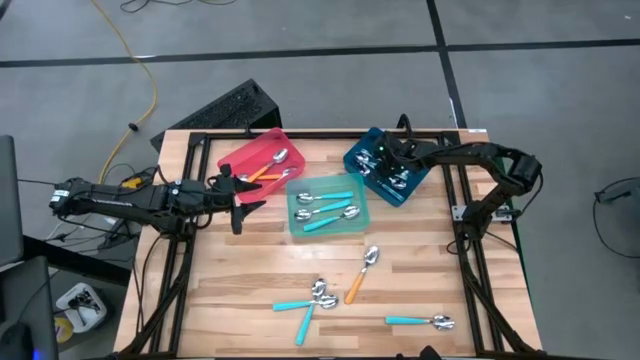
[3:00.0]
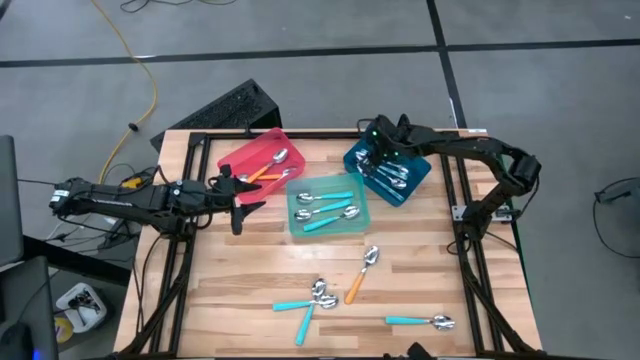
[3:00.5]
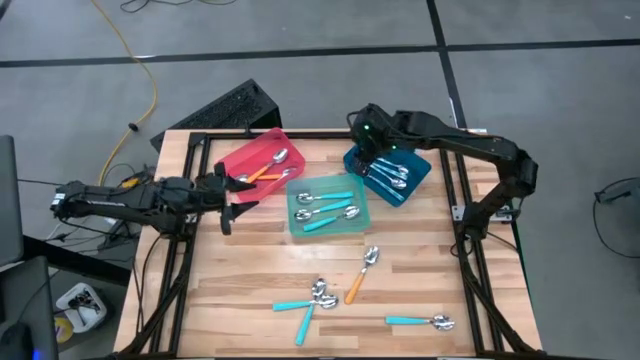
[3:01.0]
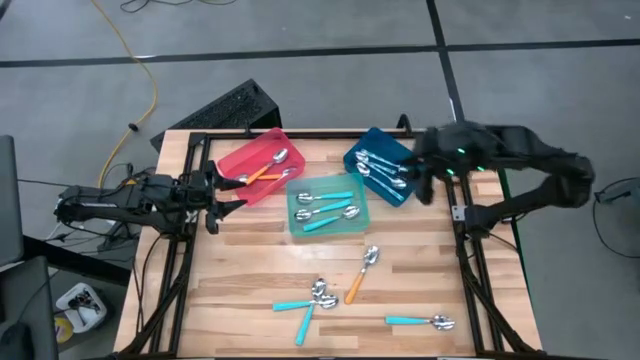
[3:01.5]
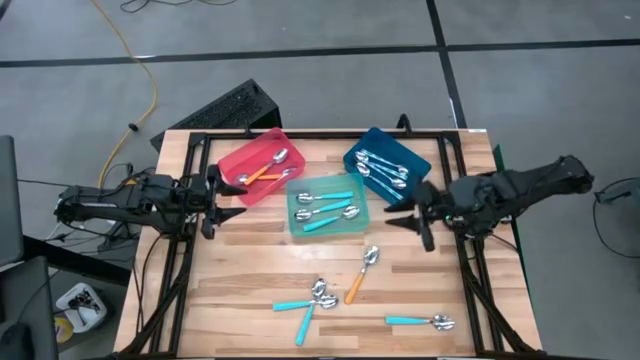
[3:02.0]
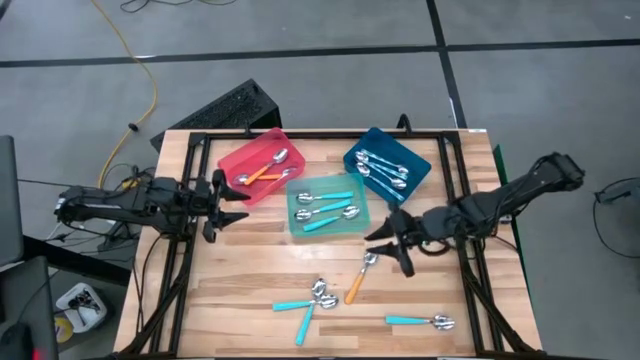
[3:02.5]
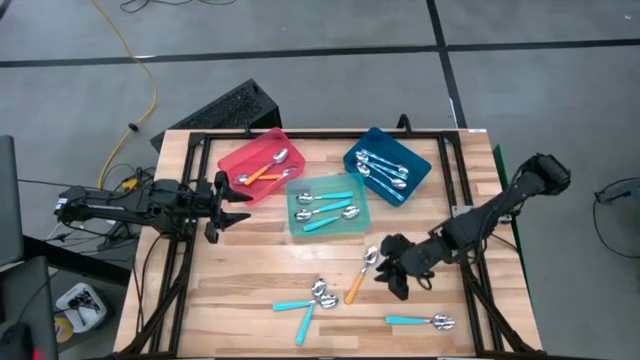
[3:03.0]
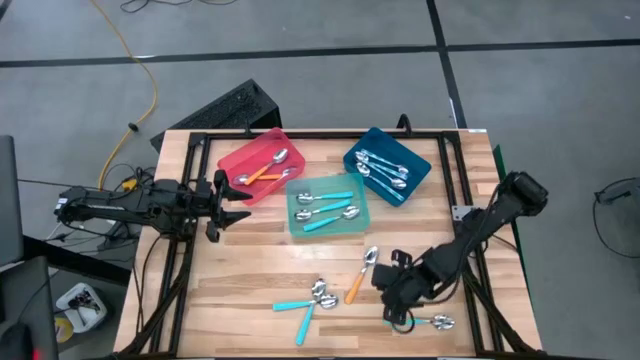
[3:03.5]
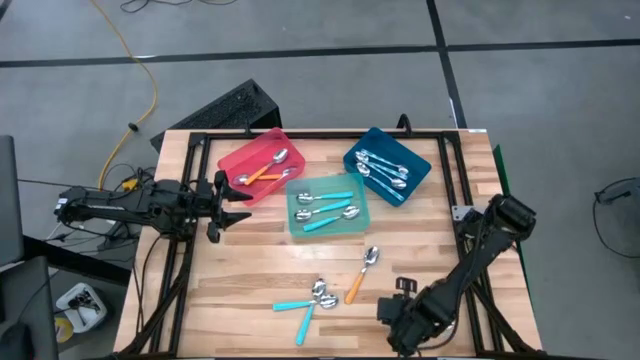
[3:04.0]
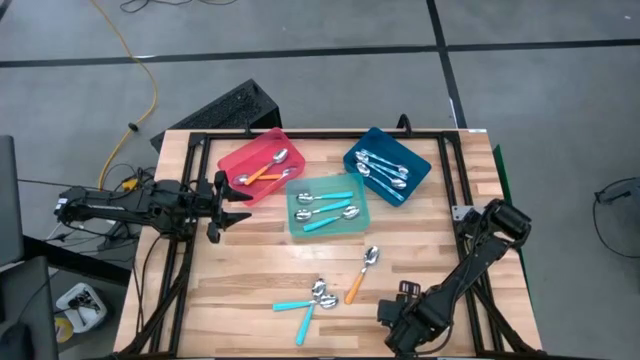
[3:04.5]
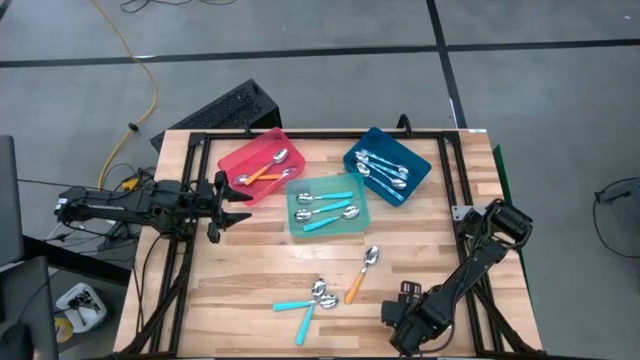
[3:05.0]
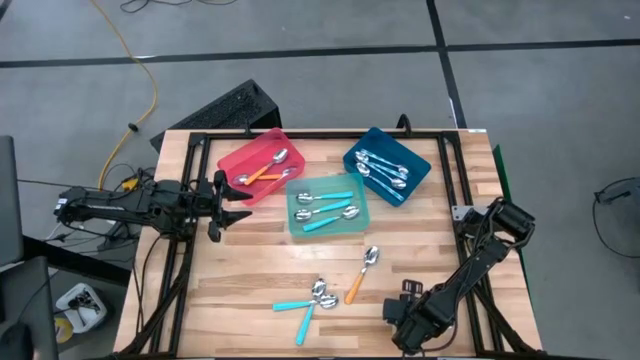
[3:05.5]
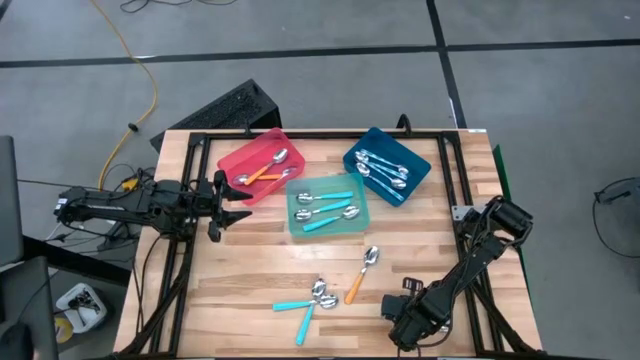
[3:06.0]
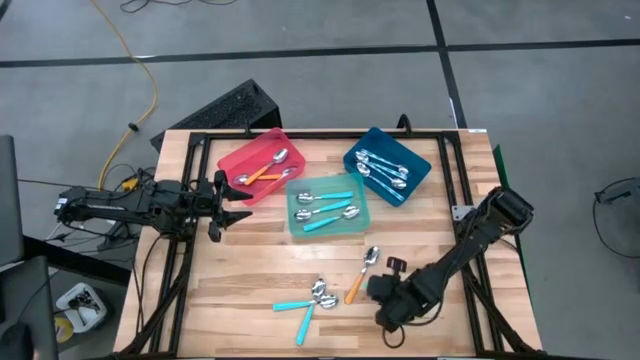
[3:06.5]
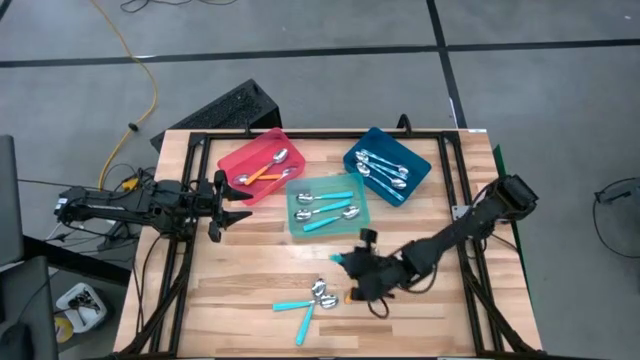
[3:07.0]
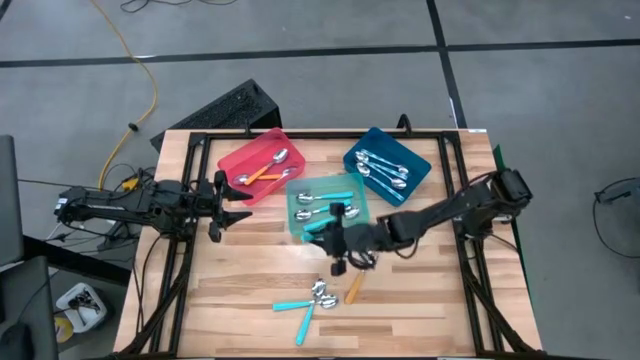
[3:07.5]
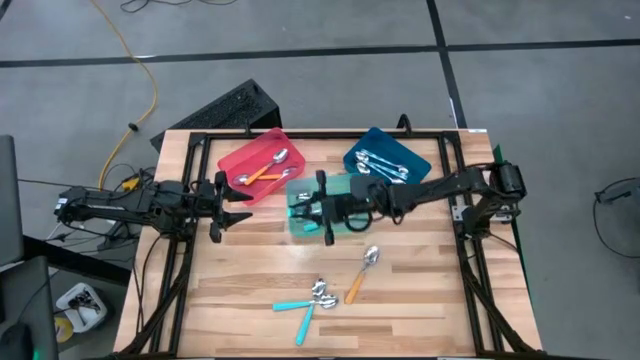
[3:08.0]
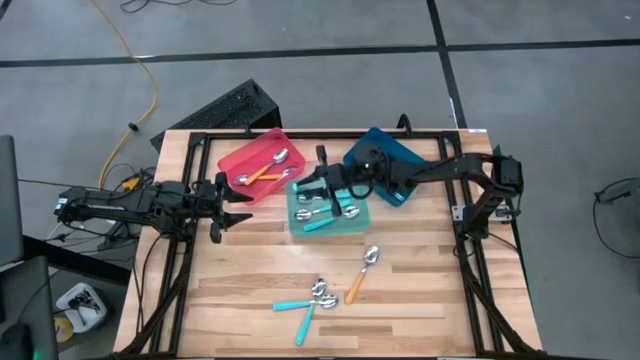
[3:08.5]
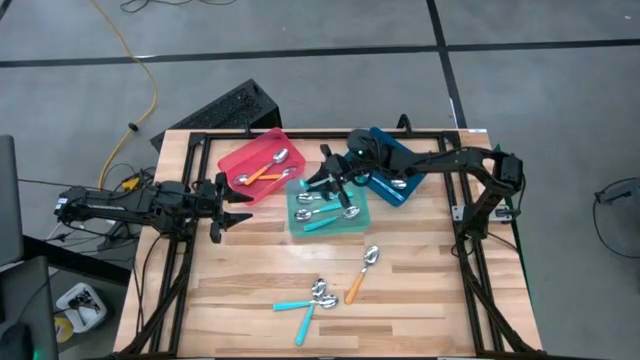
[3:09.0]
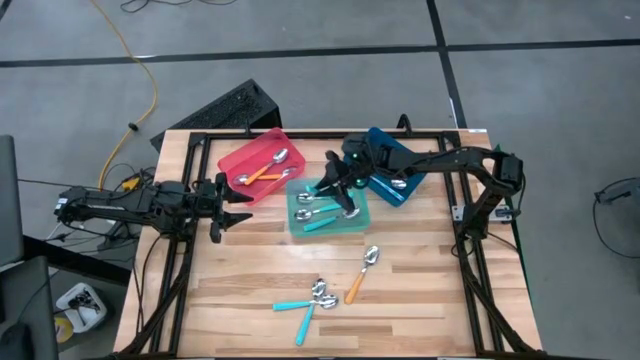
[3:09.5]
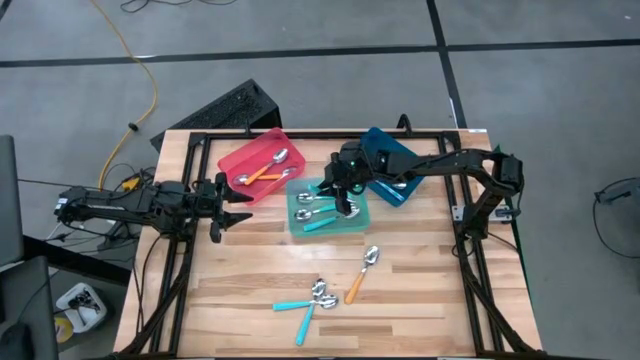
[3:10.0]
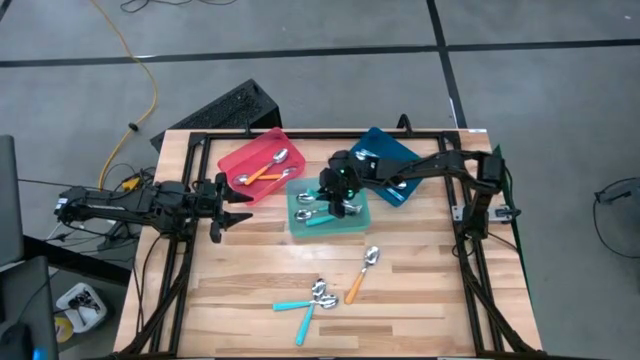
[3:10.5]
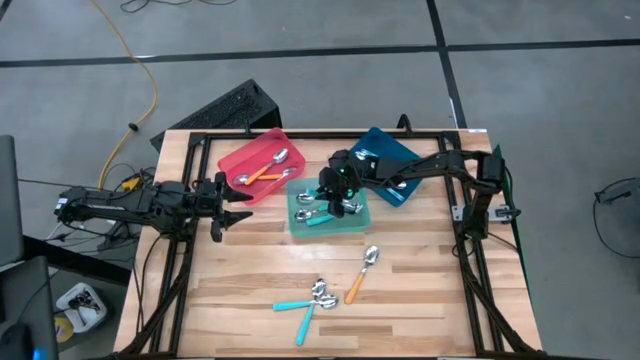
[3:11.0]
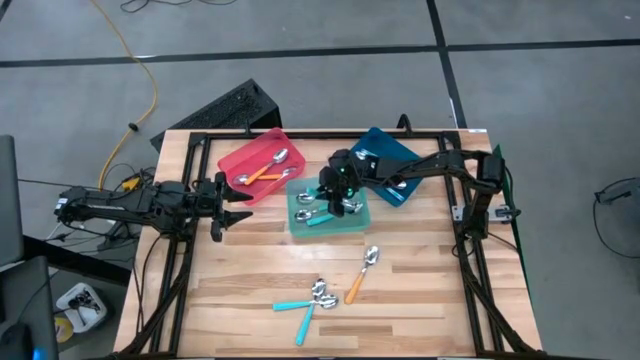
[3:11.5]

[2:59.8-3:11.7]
Task: Sort silverware by color (type)
Put the right blue spoon into the green bin

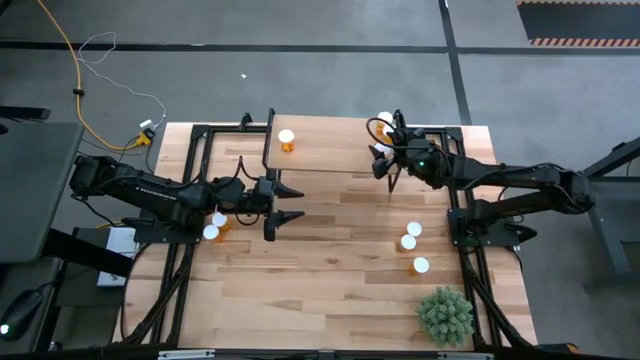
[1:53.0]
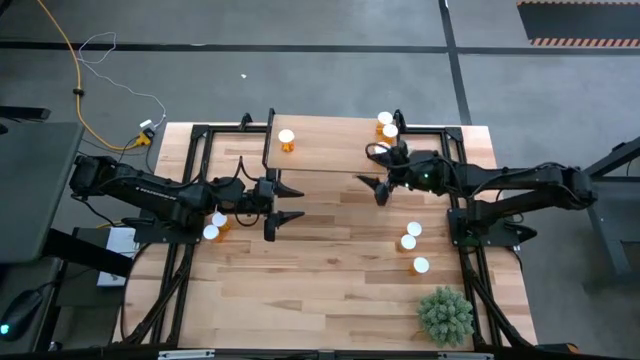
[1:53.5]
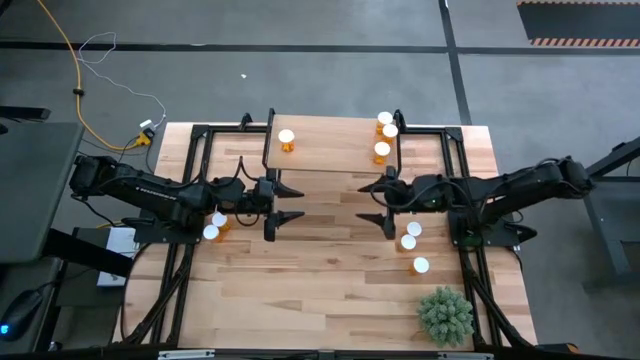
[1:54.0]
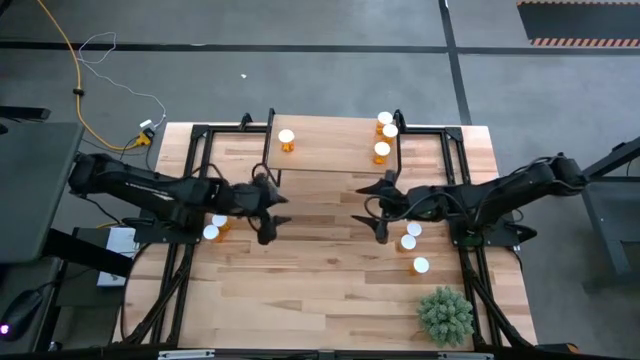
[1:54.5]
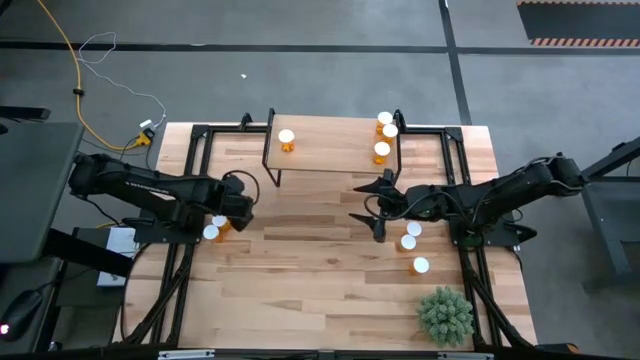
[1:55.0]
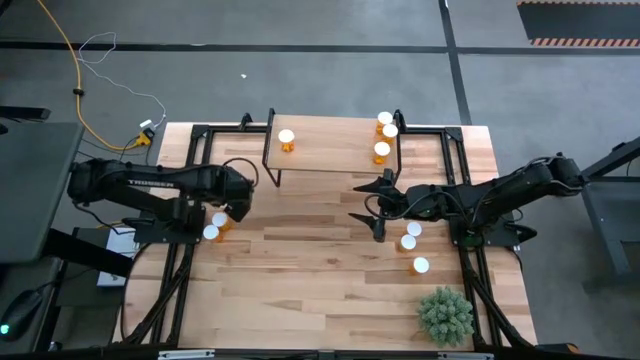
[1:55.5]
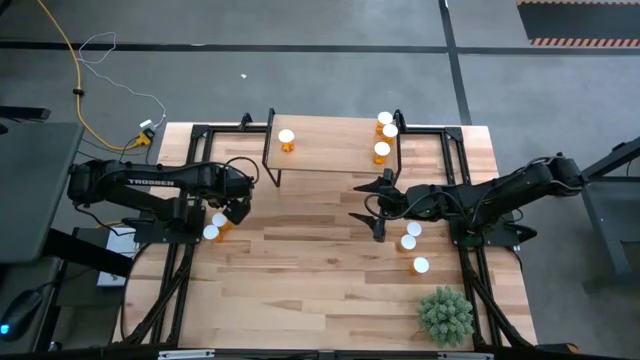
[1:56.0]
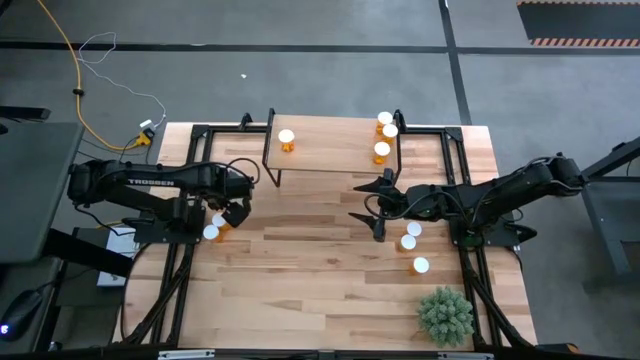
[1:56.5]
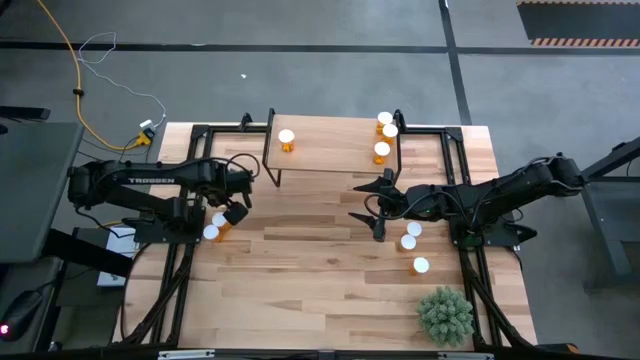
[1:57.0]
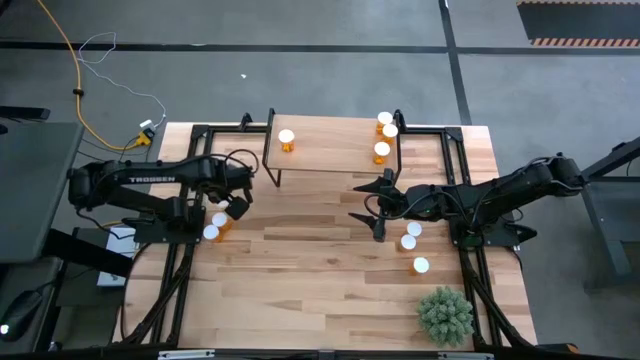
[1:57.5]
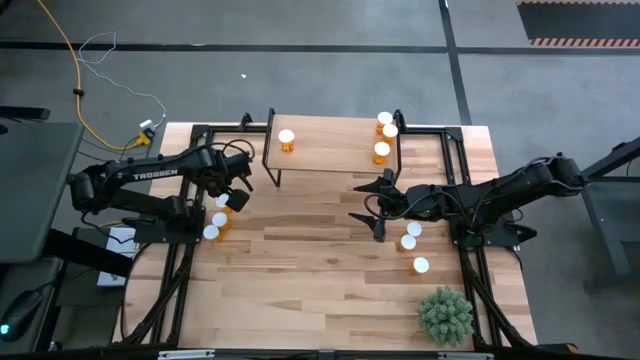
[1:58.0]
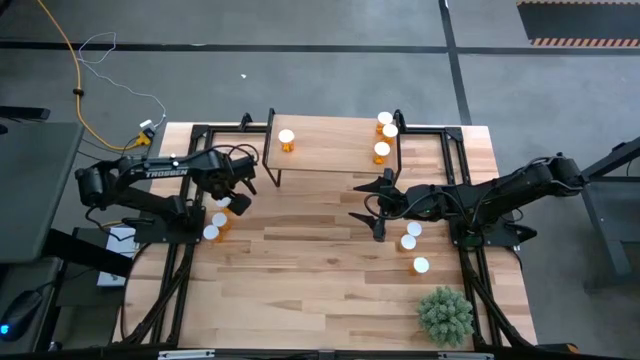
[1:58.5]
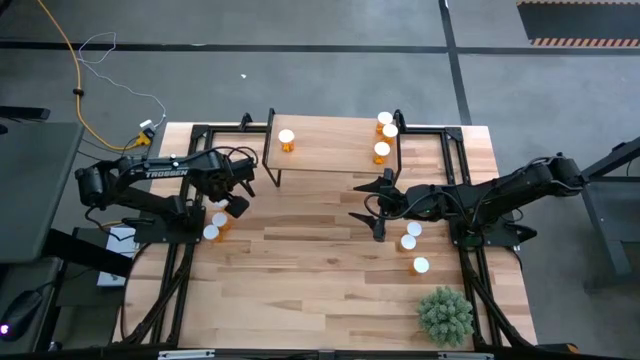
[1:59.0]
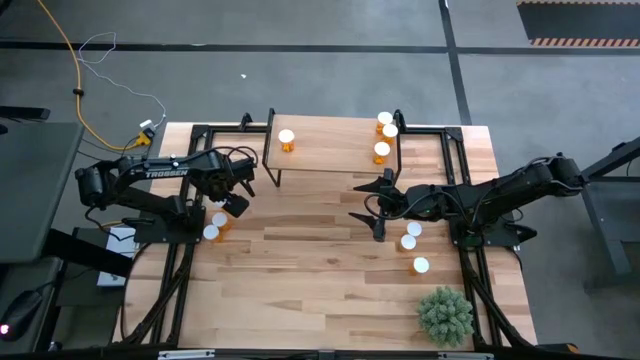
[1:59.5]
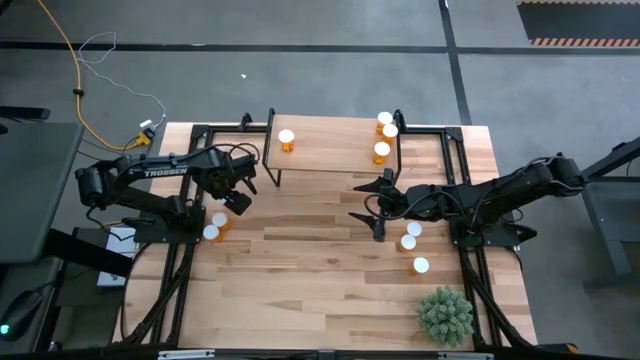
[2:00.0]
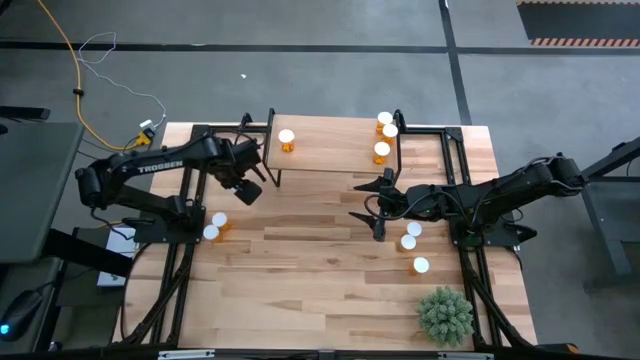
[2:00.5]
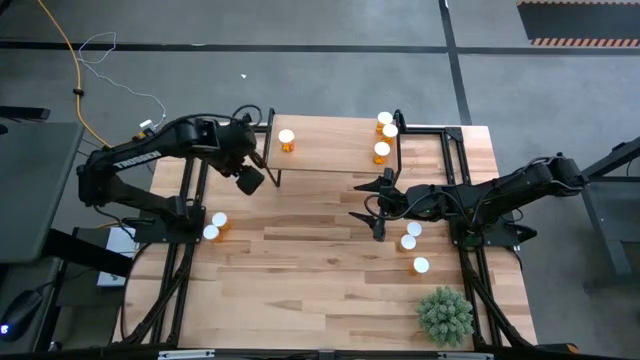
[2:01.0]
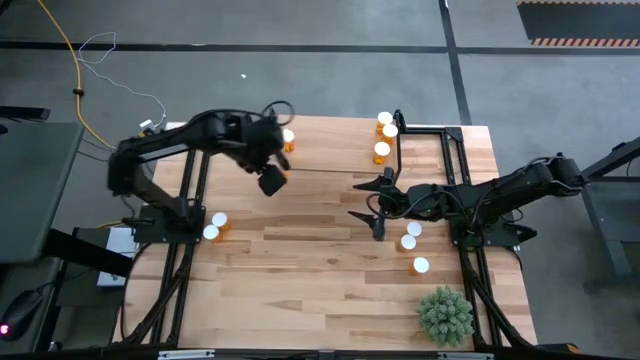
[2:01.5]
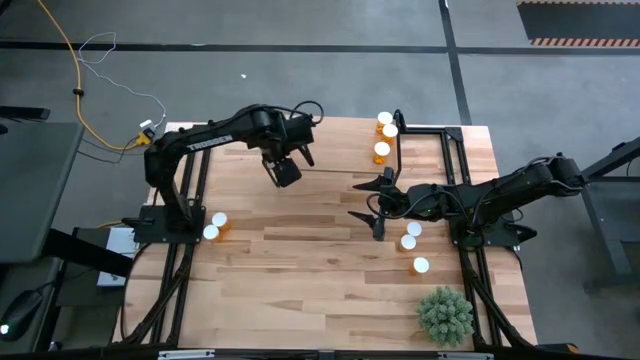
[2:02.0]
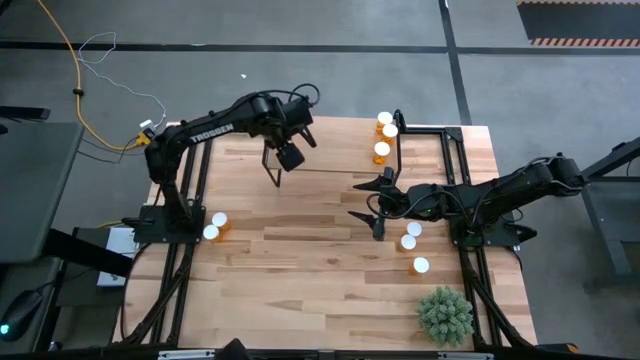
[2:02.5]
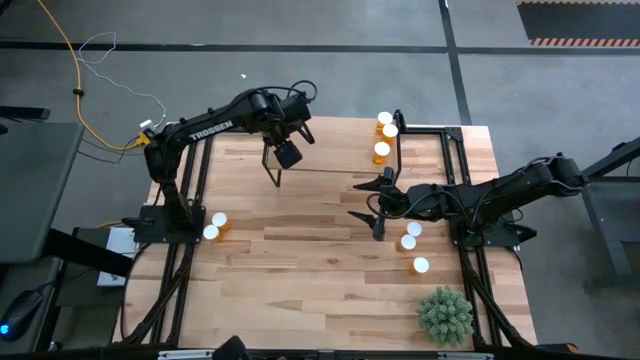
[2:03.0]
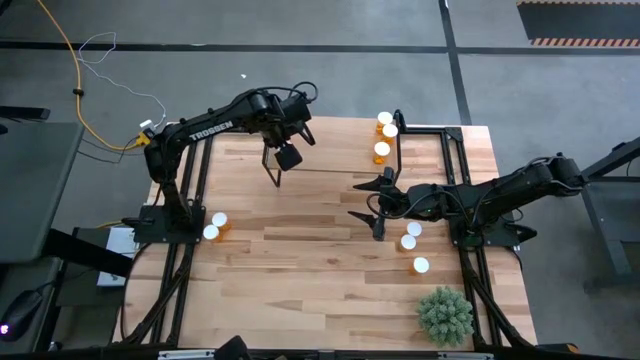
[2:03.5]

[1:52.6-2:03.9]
Task: Pick and place medicine bottles onto shelf by color
Put the yellow pill bottle on the shelf
